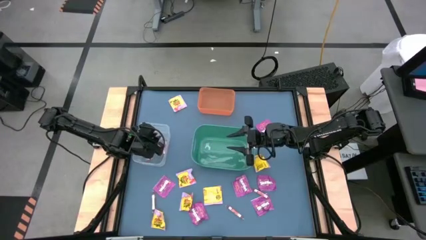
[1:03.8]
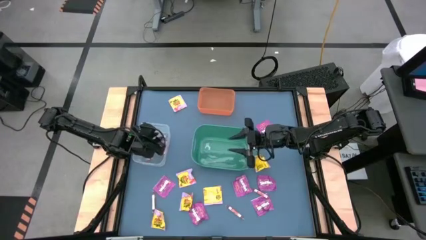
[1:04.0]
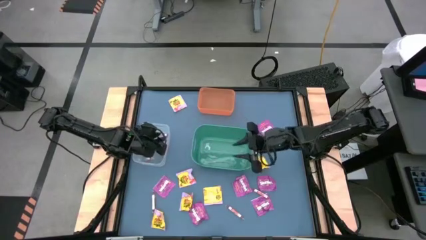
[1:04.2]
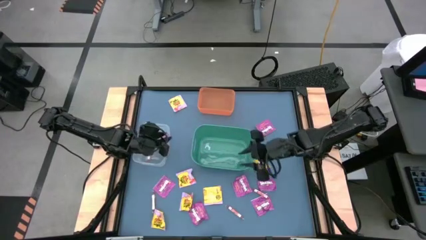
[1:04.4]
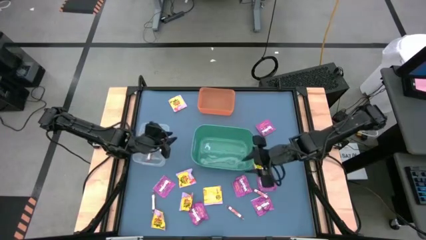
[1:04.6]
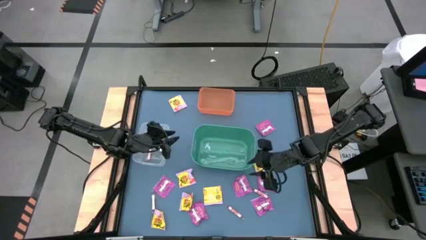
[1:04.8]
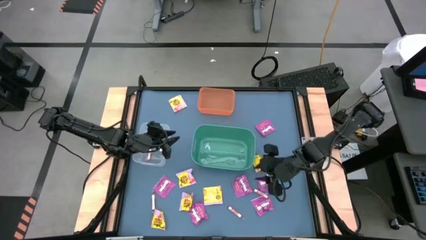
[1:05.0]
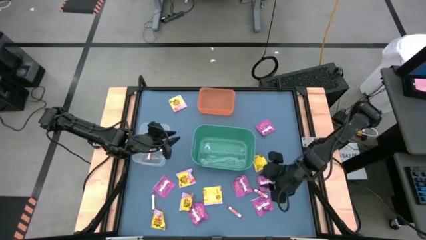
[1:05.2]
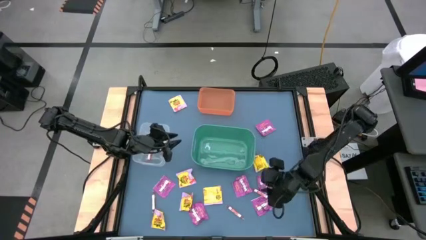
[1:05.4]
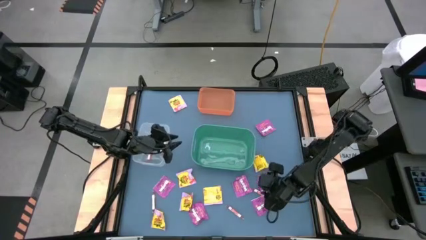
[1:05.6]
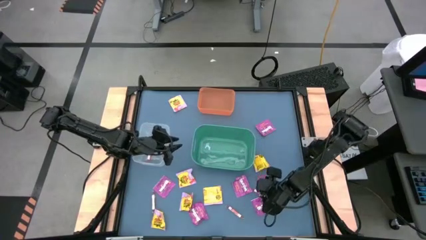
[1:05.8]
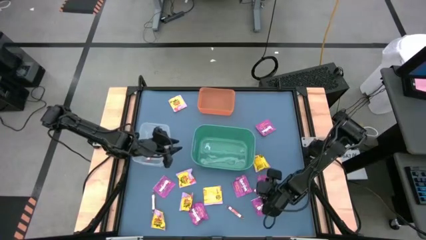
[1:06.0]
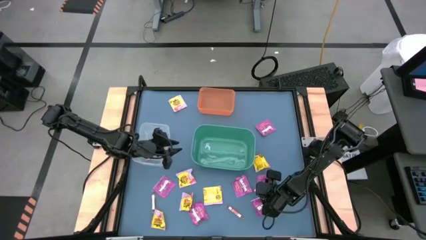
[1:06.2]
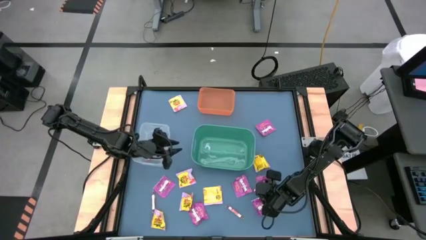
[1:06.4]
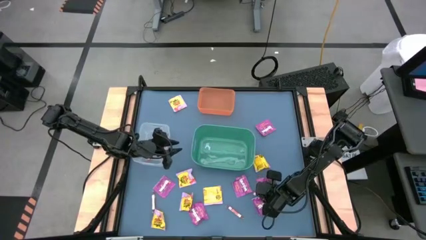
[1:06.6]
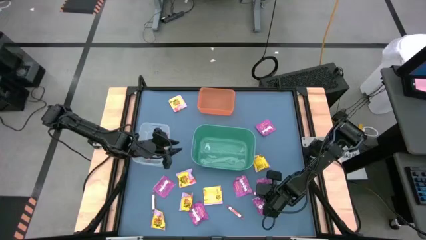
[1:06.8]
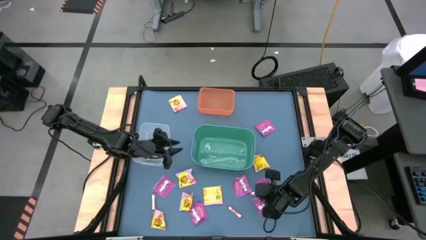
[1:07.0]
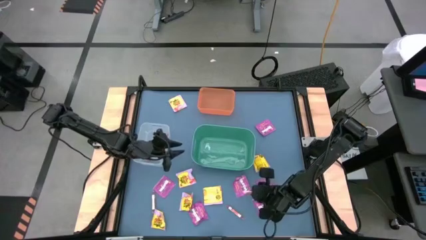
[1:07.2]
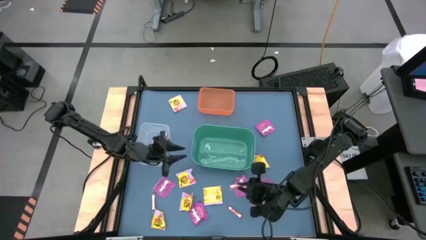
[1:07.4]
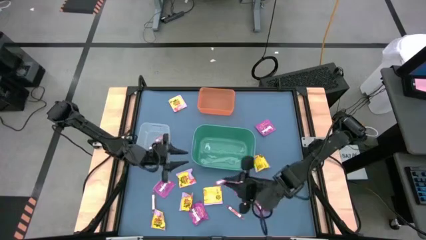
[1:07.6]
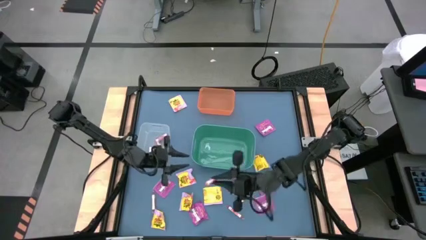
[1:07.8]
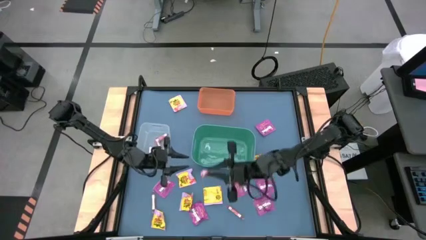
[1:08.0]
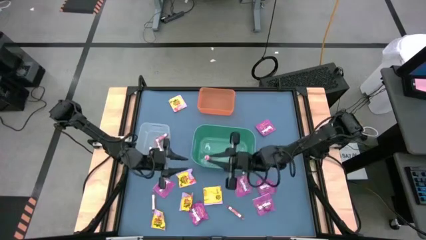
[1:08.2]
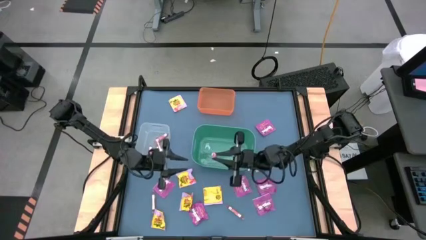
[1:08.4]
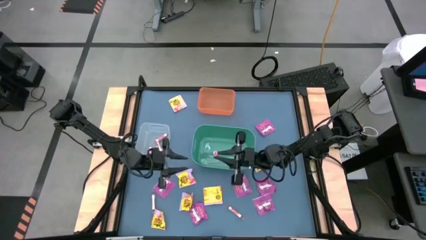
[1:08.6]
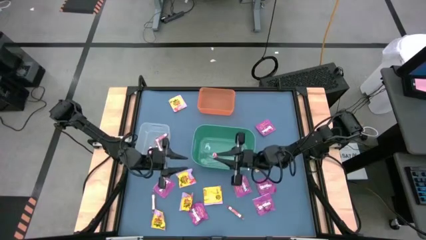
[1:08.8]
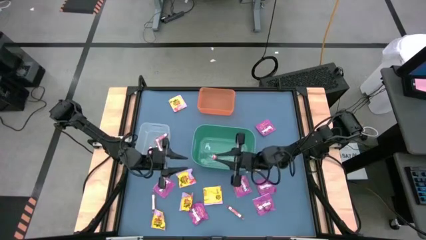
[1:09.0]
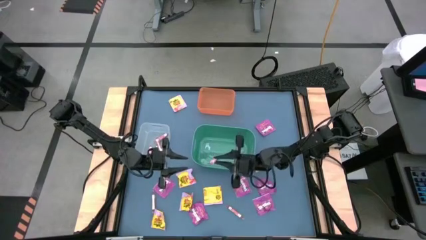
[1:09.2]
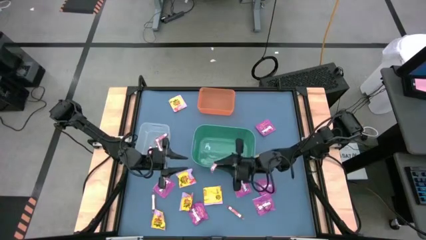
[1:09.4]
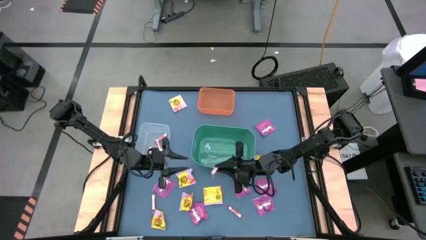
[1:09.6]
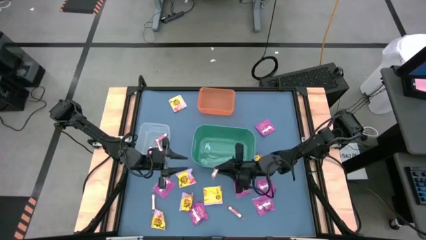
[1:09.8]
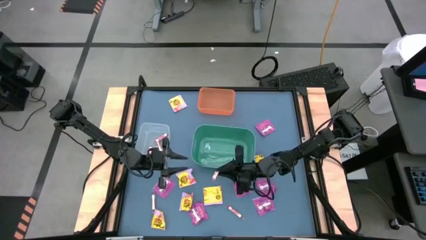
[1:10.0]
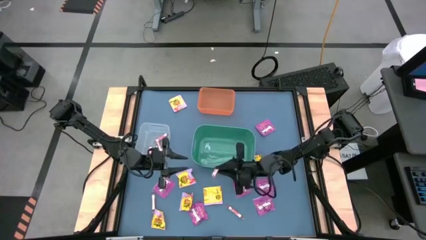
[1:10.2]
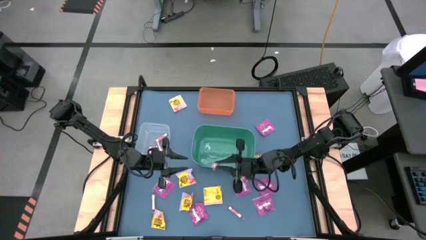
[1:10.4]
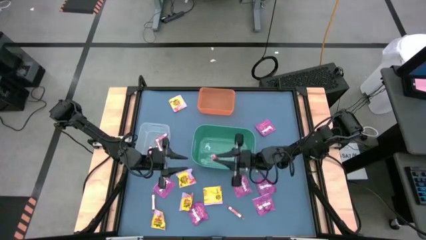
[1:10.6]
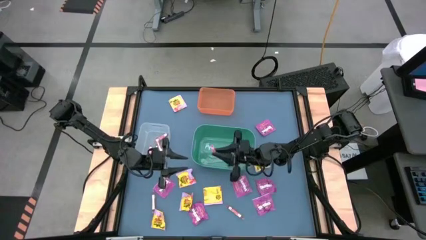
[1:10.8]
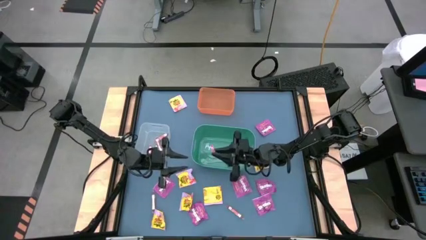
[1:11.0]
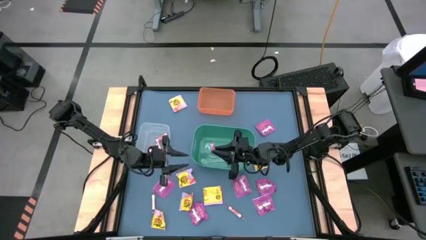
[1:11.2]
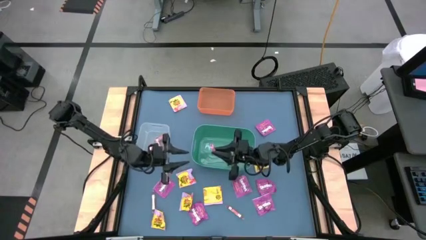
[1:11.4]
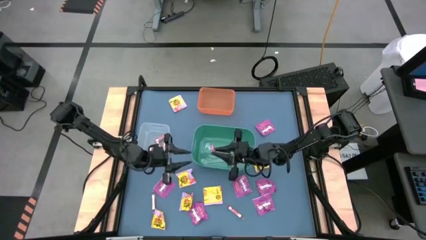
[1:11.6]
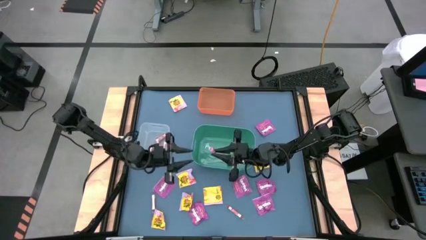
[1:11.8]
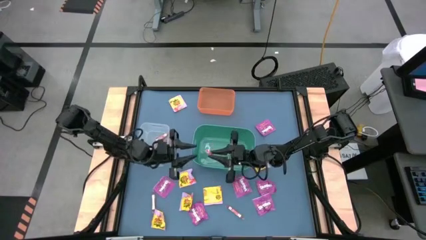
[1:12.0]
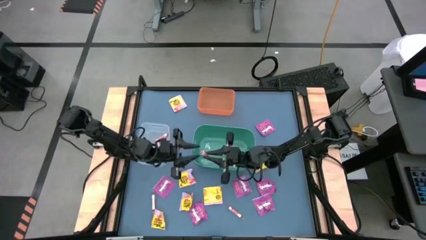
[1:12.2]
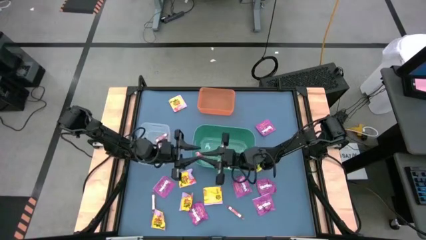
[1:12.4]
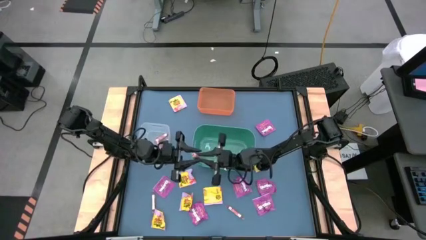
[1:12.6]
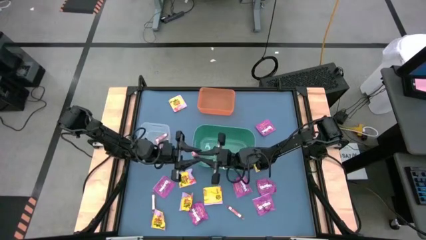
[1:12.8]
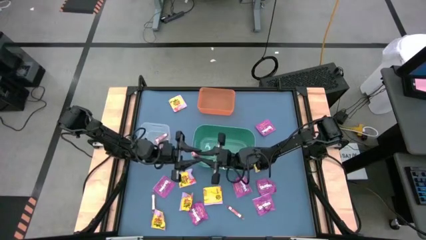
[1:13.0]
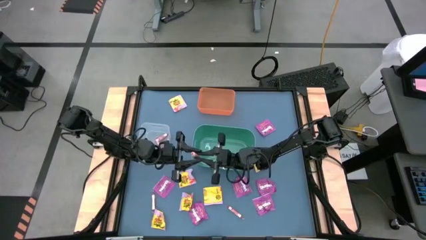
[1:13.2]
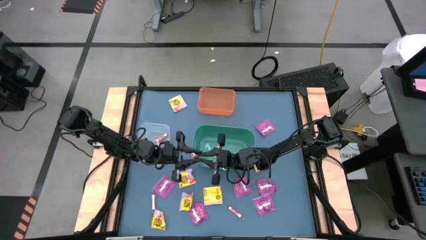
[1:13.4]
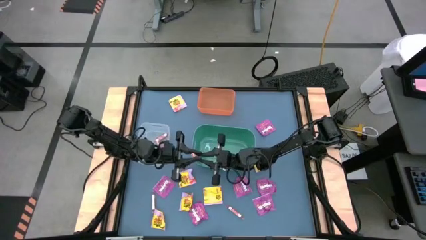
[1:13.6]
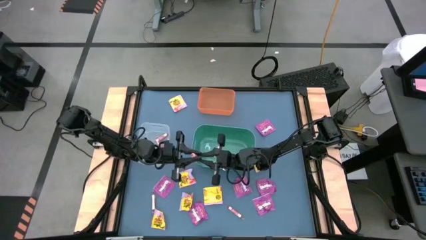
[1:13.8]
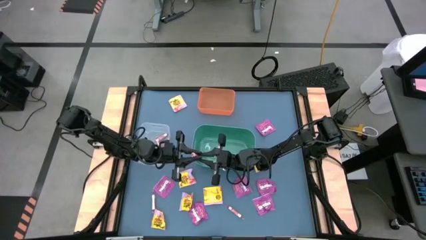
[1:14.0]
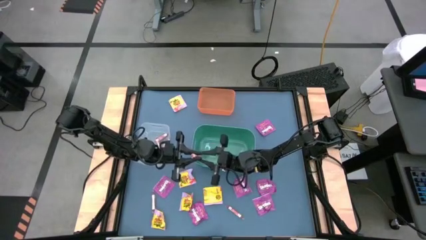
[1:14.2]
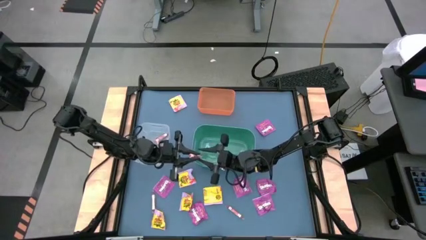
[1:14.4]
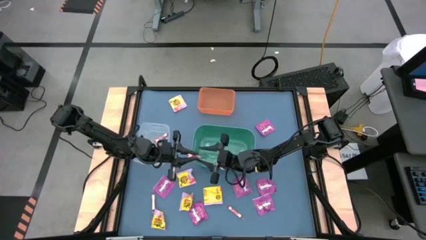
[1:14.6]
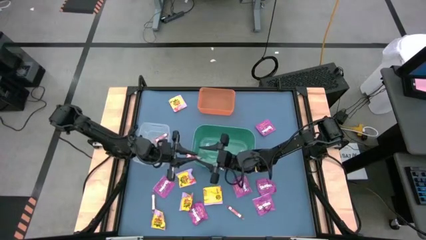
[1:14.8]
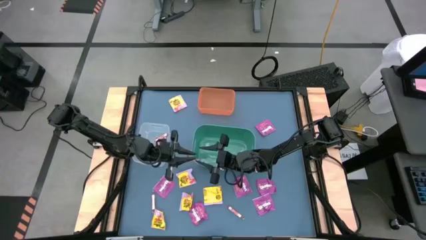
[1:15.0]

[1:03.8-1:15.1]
Task: Sort candy
Put the orange candy into the transparent bin

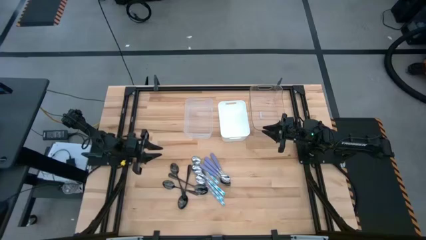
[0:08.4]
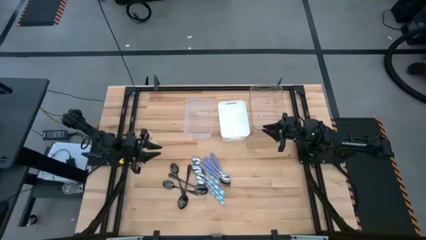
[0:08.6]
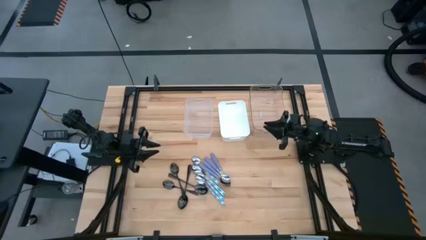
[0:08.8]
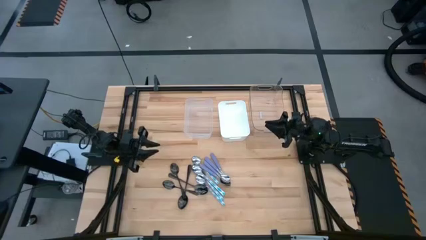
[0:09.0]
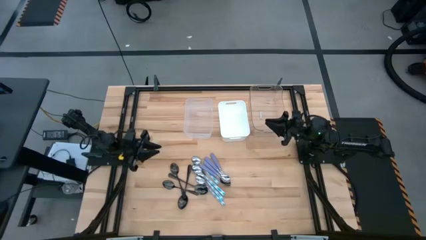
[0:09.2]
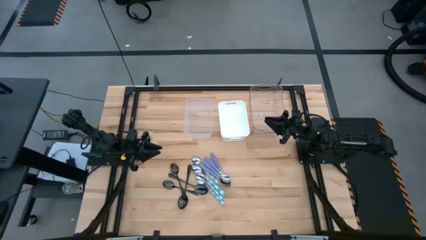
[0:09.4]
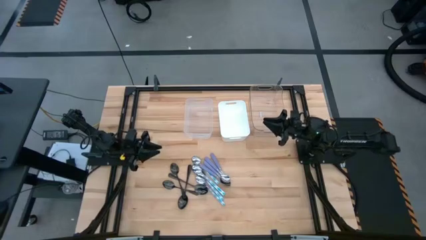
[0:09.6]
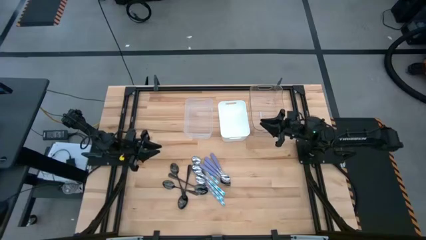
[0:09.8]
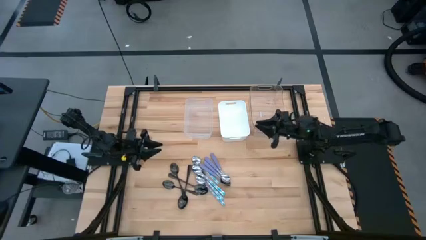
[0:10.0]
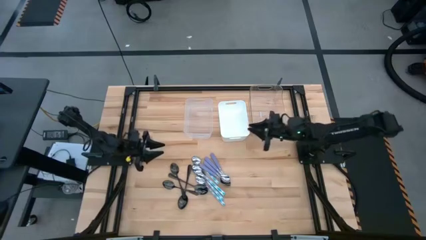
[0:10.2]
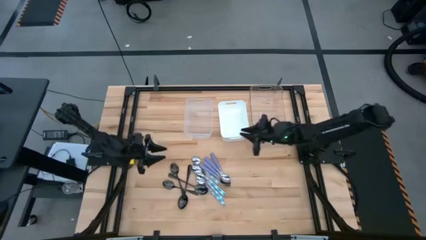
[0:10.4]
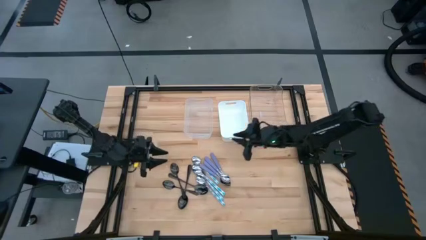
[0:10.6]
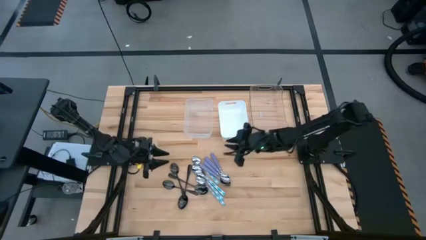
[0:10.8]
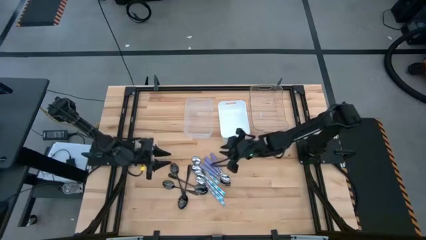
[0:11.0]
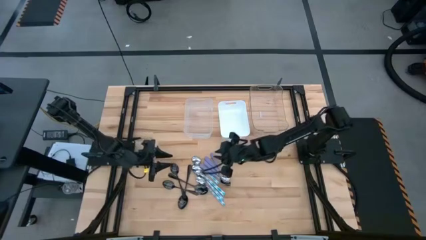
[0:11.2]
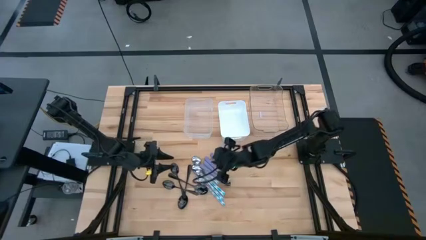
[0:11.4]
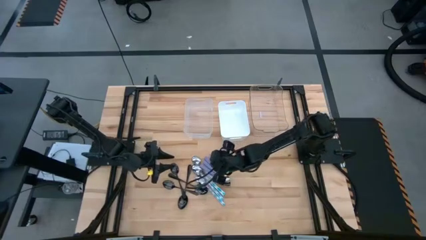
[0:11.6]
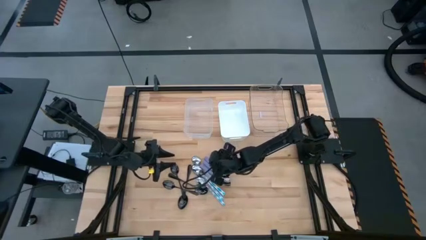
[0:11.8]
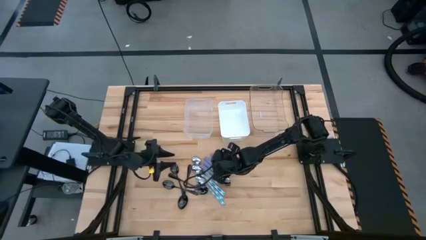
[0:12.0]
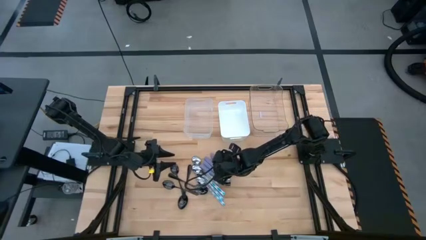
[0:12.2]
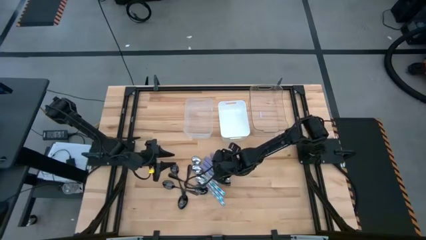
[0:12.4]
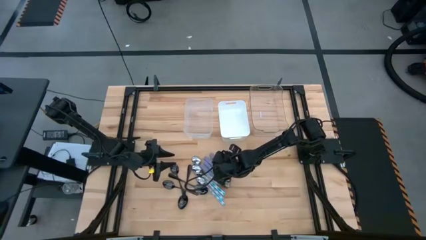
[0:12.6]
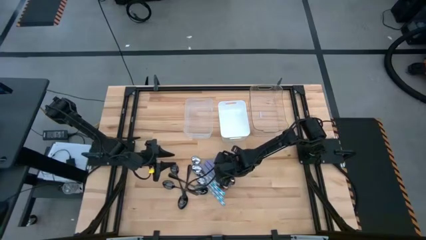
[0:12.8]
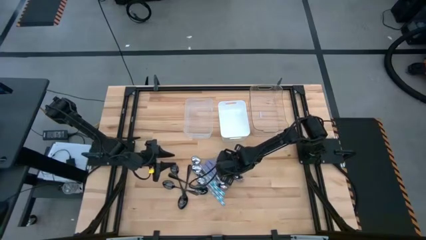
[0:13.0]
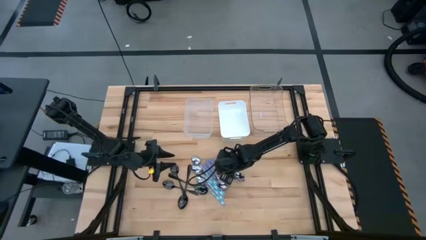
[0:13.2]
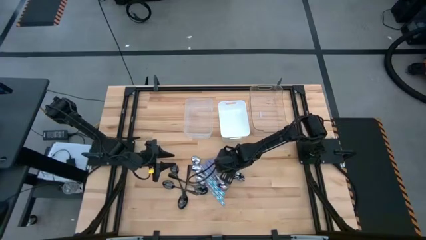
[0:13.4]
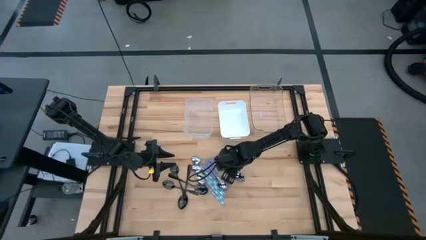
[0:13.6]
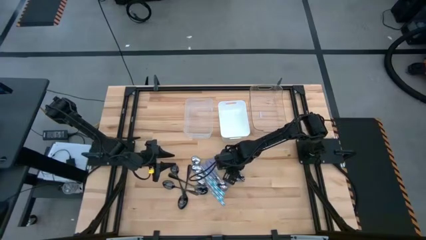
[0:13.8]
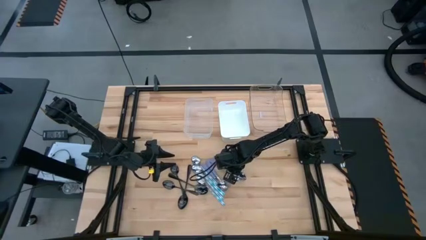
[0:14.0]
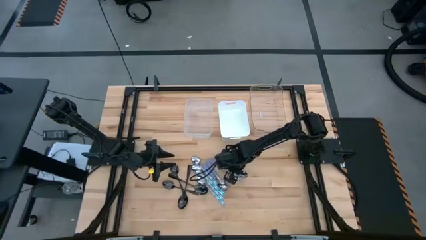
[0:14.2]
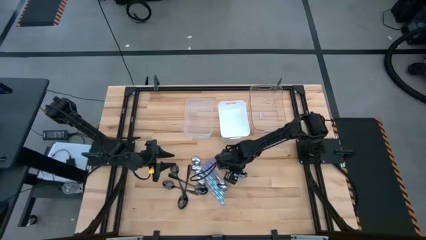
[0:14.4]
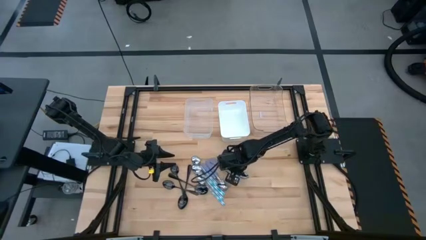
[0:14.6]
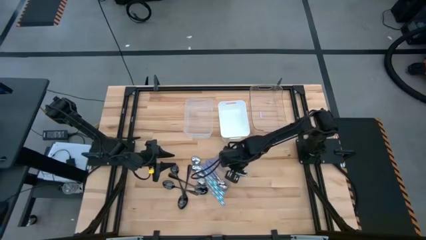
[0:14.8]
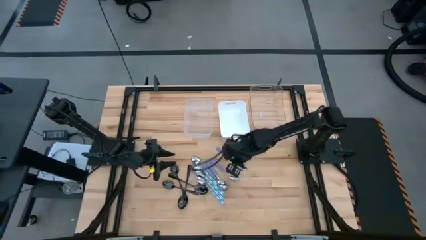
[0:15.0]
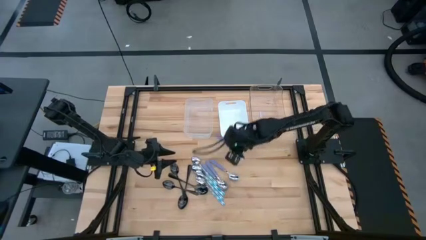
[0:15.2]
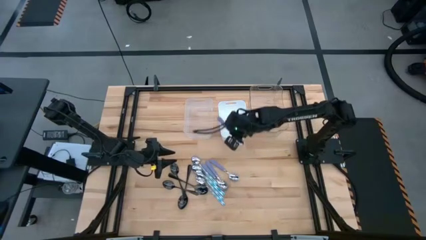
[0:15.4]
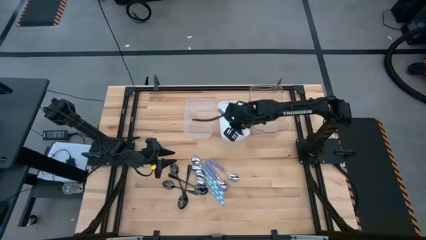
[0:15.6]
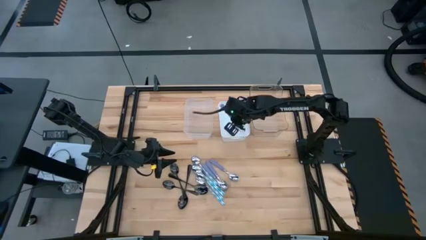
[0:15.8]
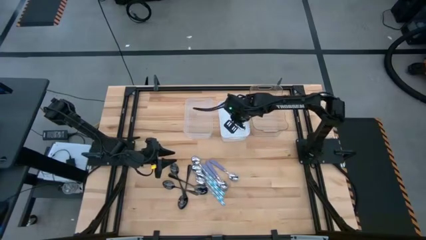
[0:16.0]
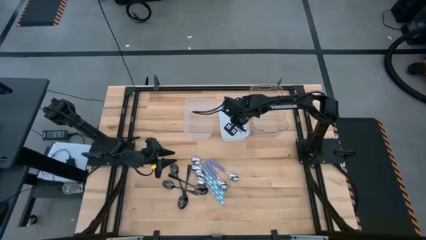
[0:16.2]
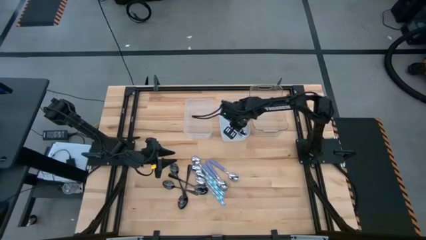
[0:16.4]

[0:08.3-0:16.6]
Task: Sort silverware by color (type)
Put the violet spoon into the white bin
